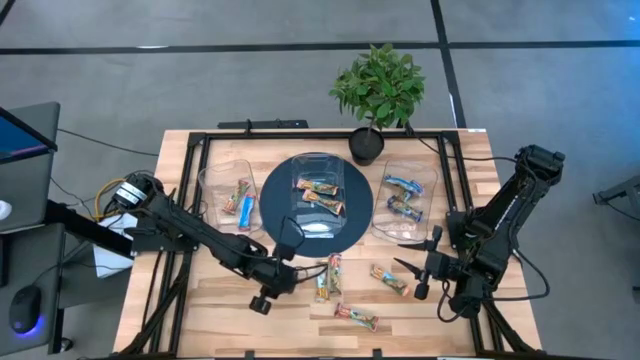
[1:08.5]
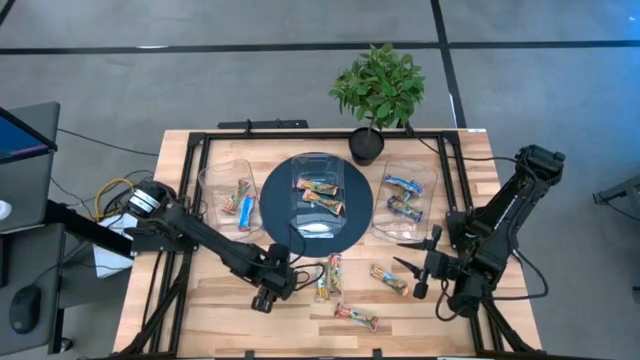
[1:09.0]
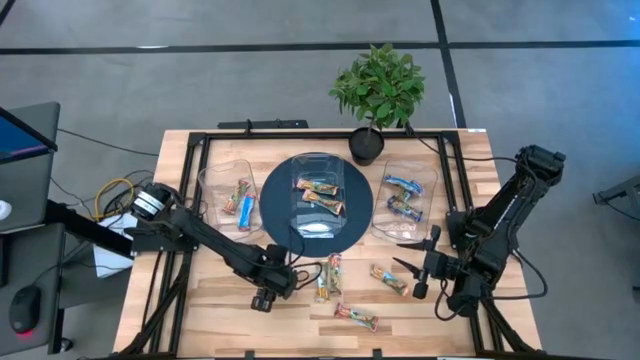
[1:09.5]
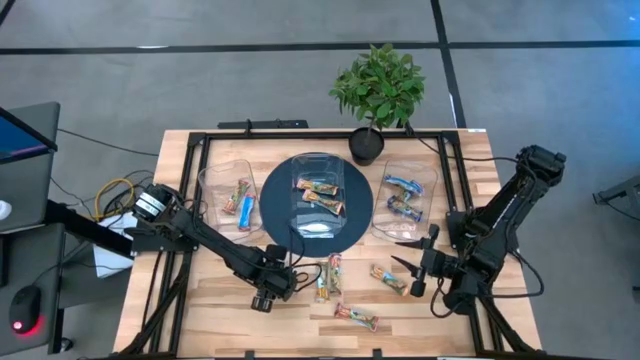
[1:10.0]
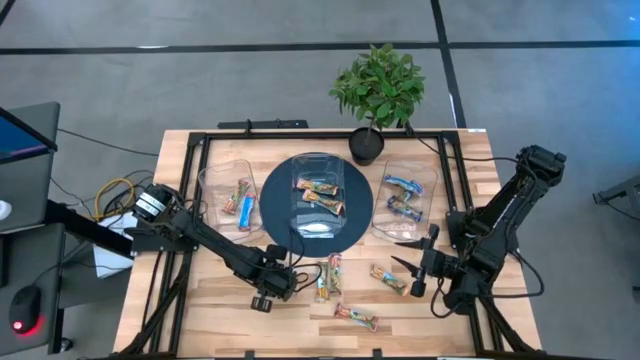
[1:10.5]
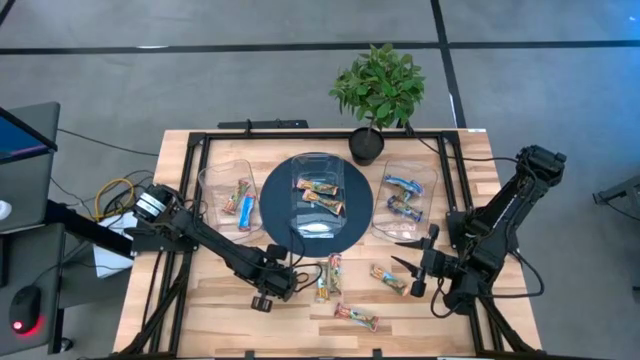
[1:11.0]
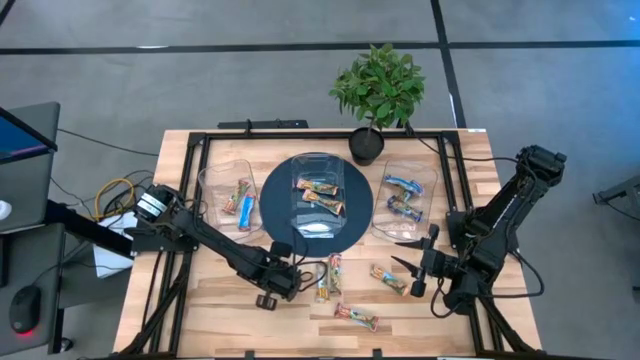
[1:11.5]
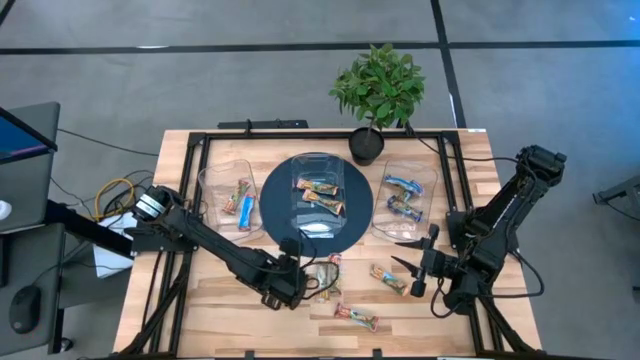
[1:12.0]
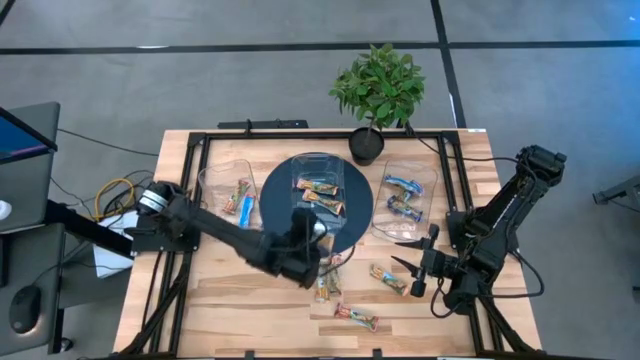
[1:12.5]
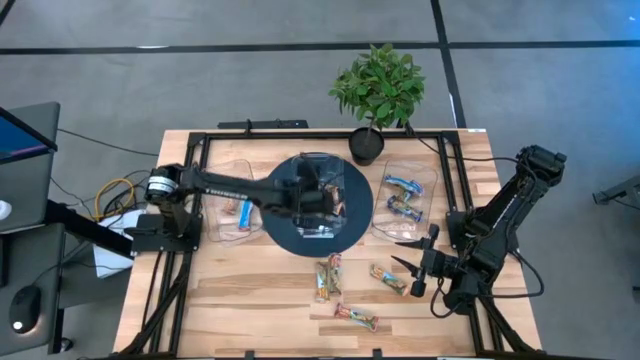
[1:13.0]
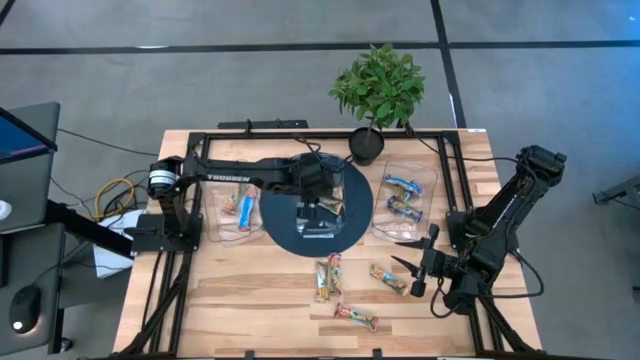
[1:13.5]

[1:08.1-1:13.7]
Task: Pick and place Granola Bars by type
Put the yellow granola bar into the middle transparent bin

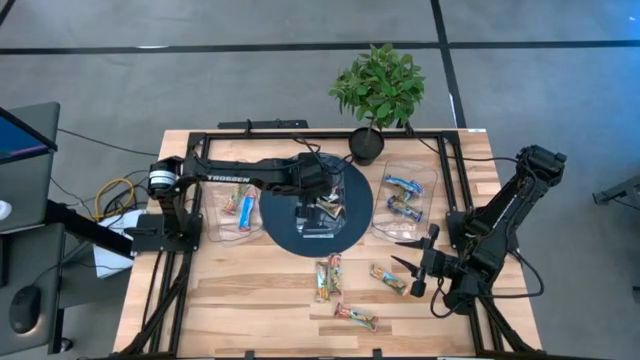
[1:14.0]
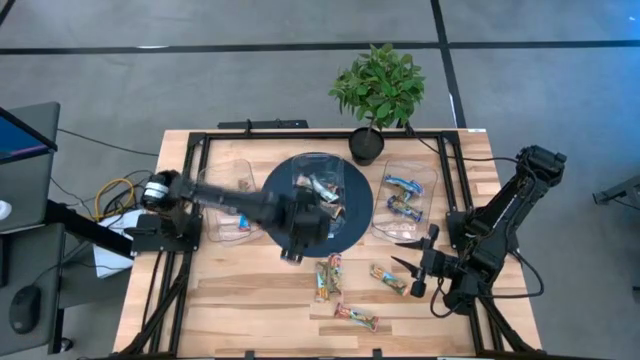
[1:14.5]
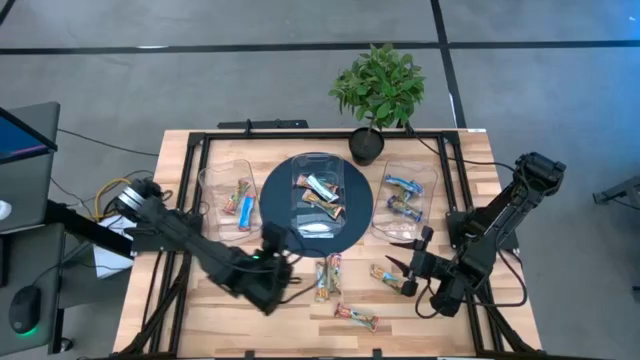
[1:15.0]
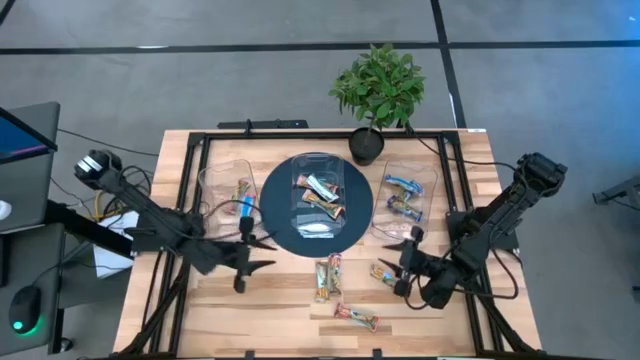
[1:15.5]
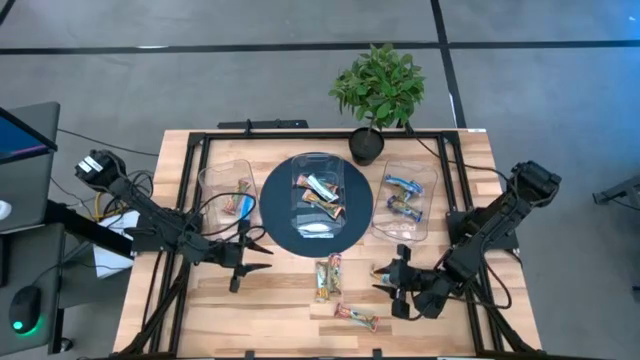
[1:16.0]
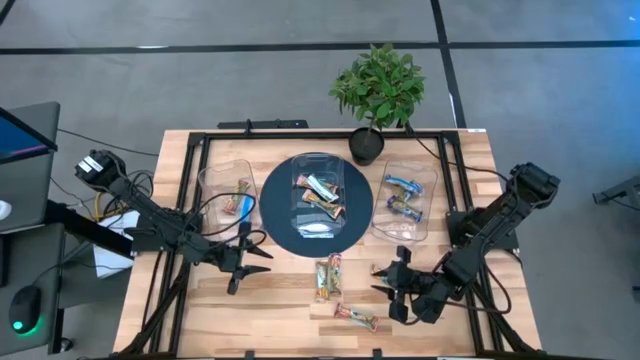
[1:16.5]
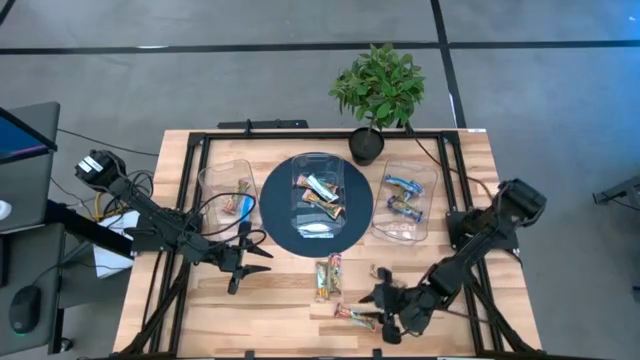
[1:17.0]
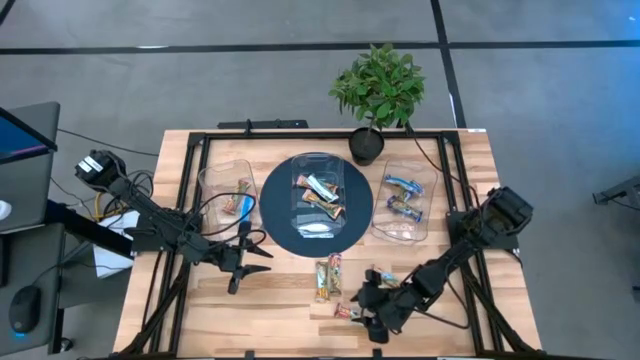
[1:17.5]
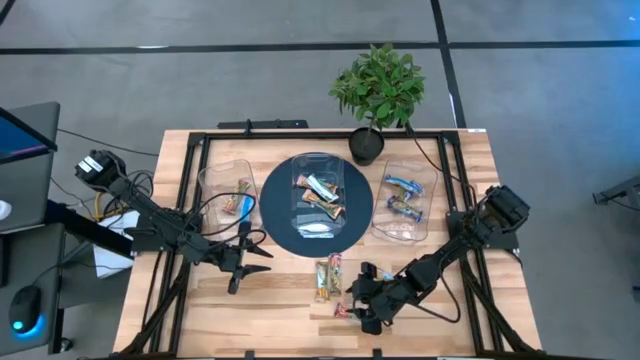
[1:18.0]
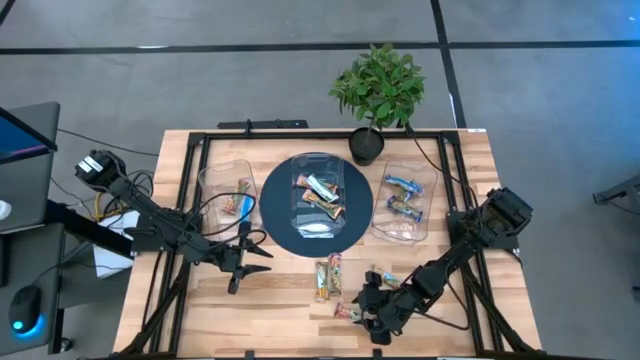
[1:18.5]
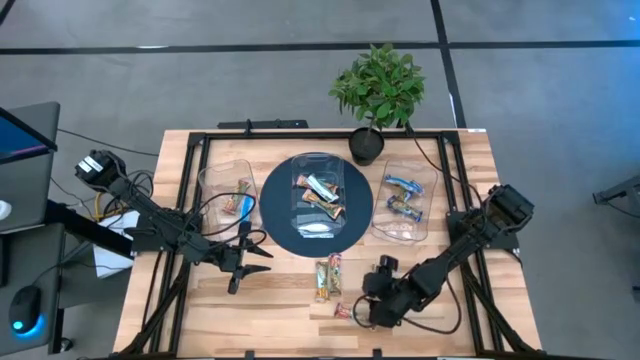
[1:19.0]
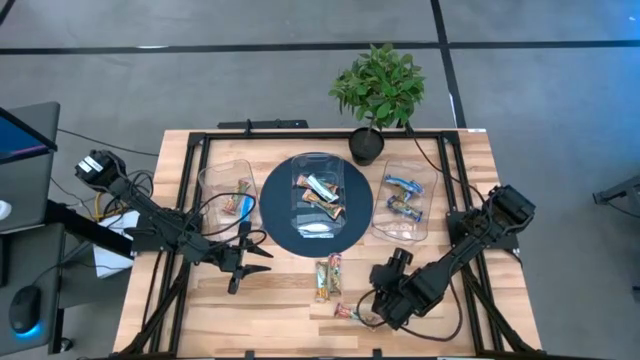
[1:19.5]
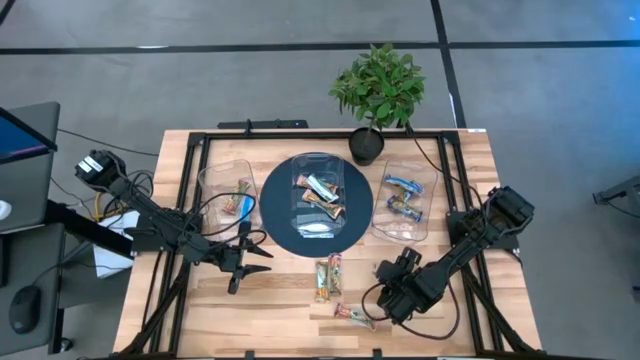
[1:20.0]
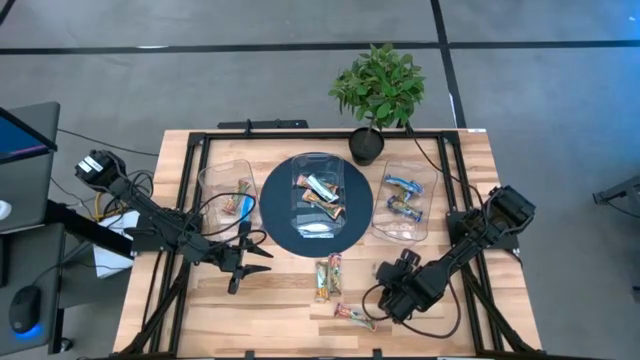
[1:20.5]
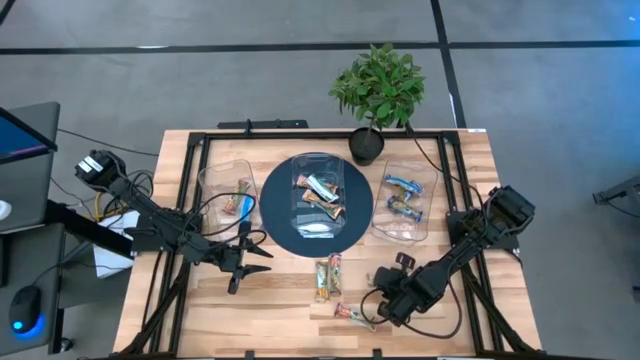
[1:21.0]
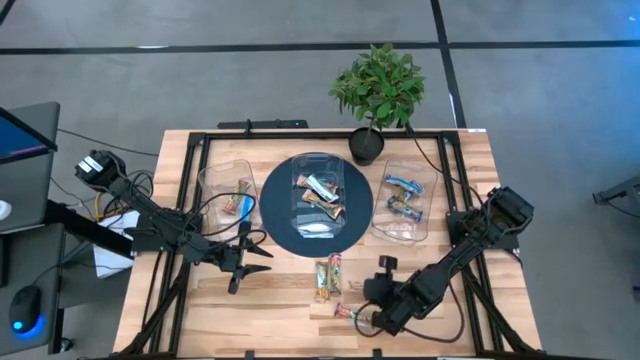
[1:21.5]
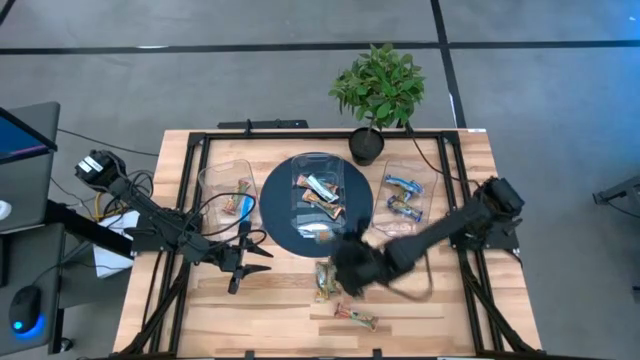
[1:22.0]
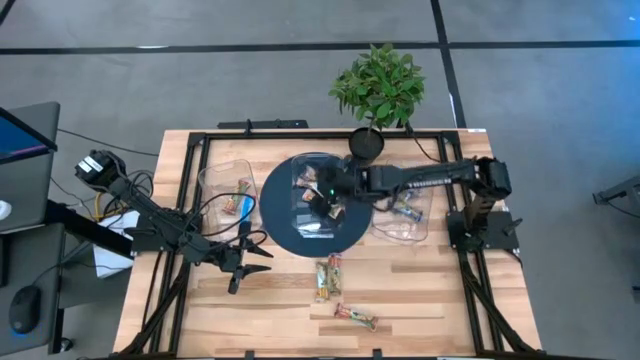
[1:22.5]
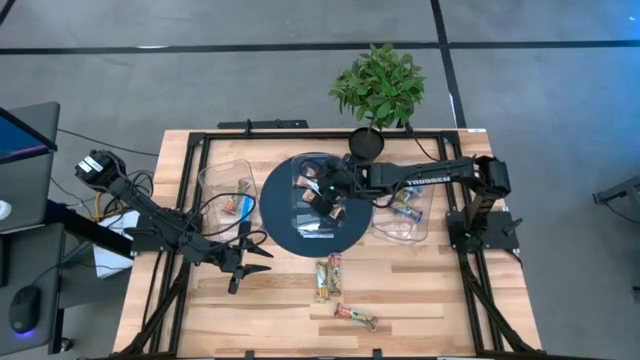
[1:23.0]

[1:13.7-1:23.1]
Put the yellow granola bar into the middle transparent bin

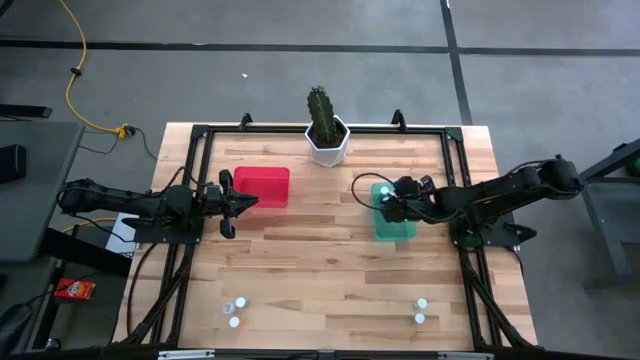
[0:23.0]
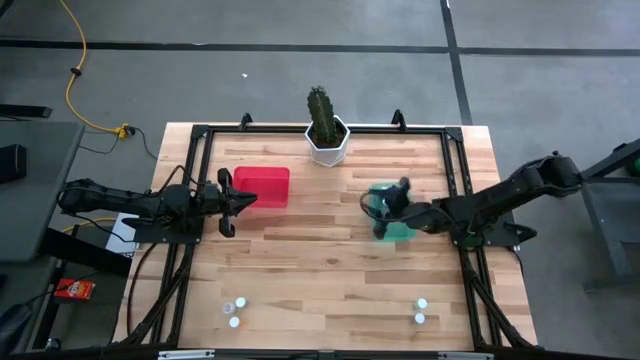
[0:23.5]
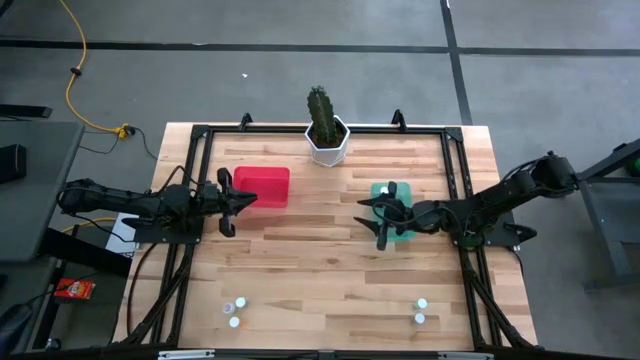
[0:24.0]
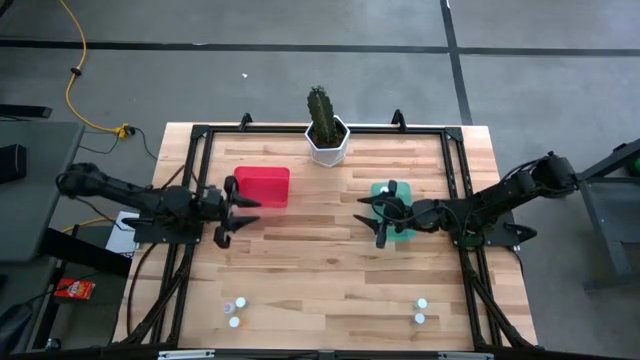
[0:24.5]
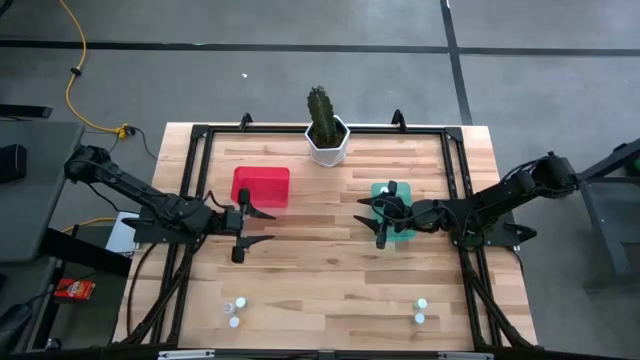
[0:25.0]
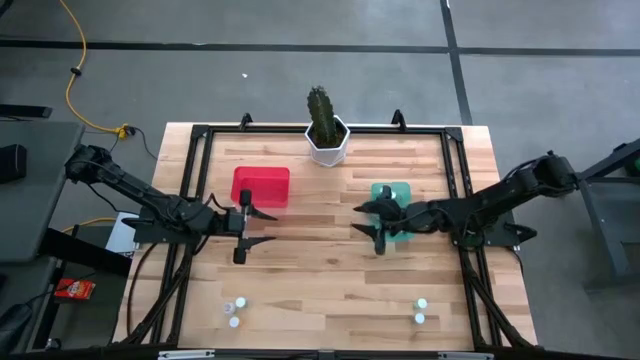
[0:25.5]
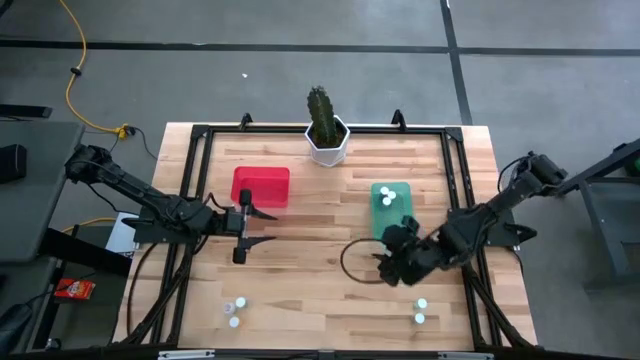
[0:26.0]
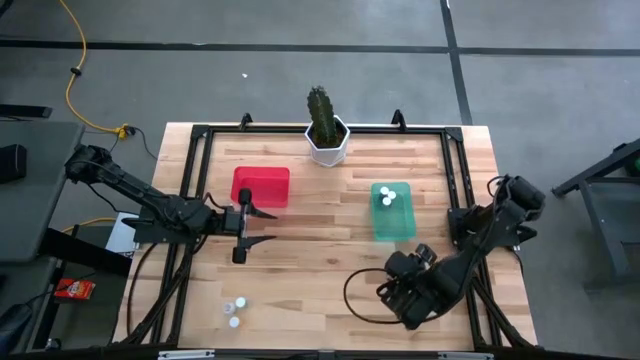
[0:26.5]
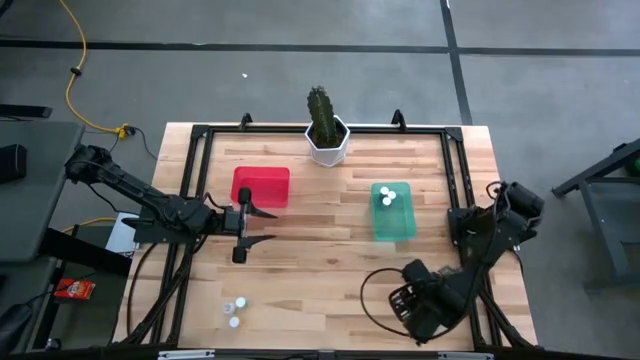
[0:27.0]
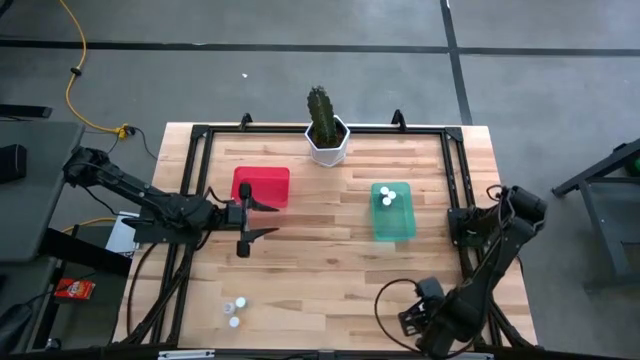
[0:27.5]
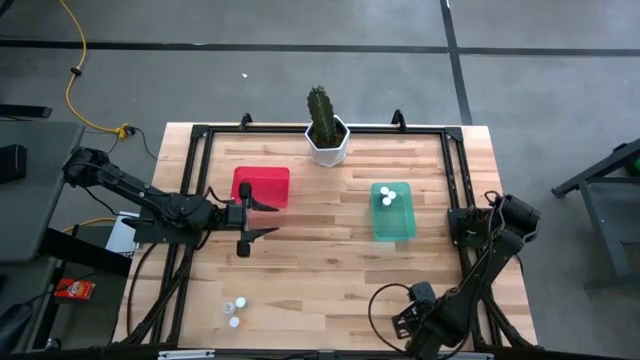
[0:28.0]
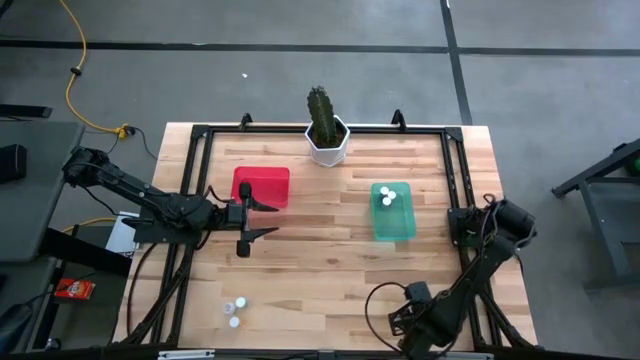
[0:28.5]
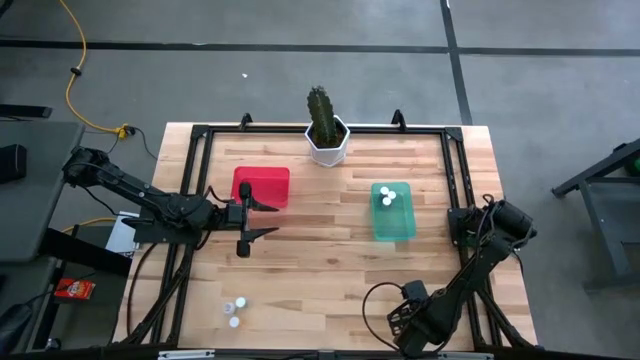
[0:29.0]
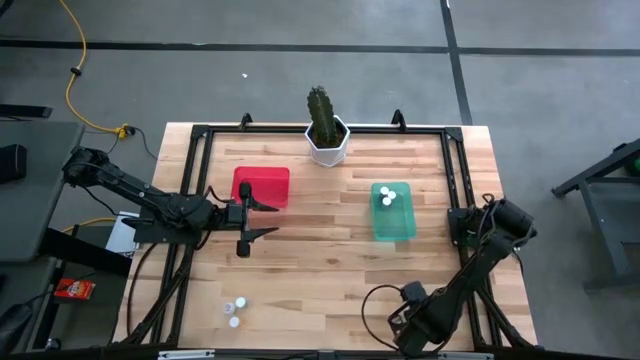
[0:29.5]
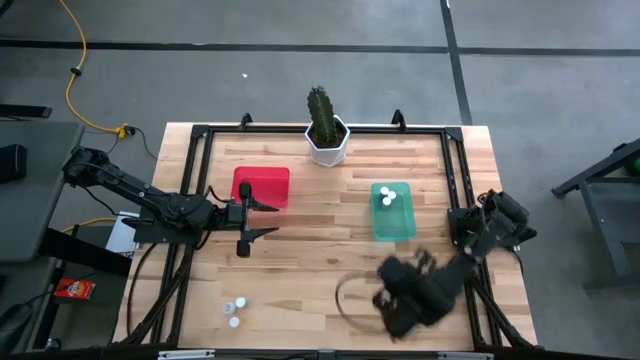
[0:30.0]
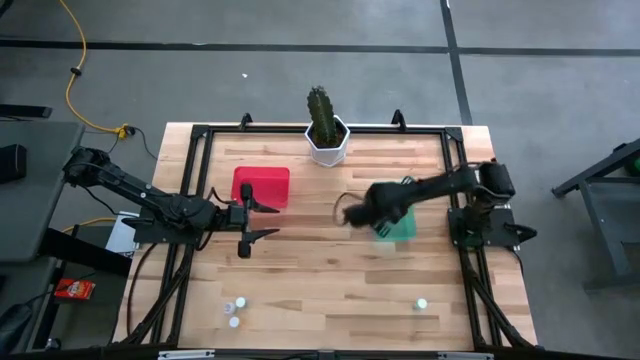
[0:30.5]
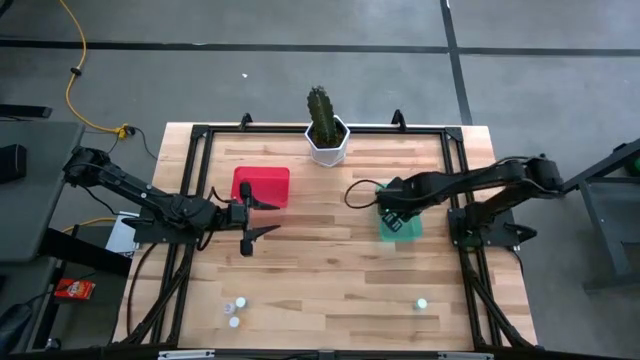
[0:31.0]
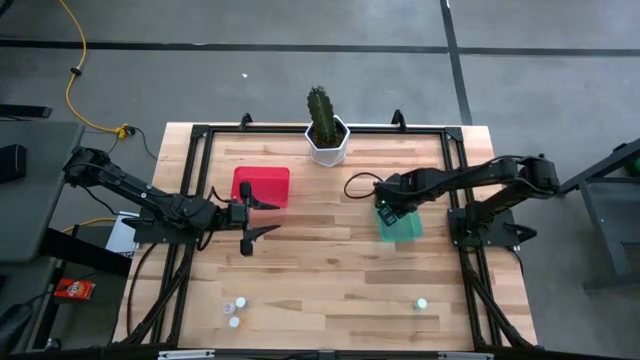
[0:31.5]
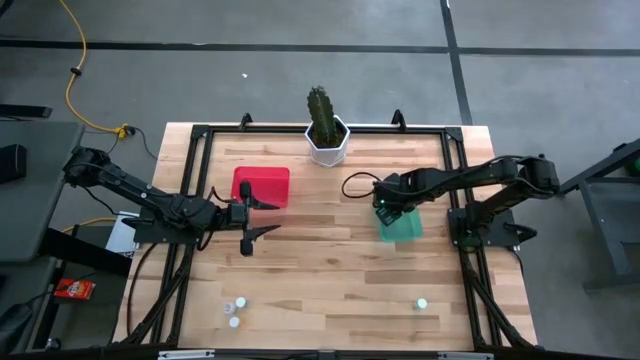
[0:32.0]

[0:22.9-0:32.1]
Task: Pick and place medicine bottles into bin by pill shape (circle, oval)
Put the blue capsule bottle into the green bin
